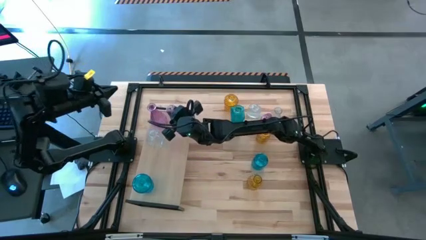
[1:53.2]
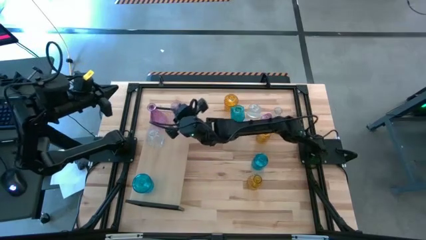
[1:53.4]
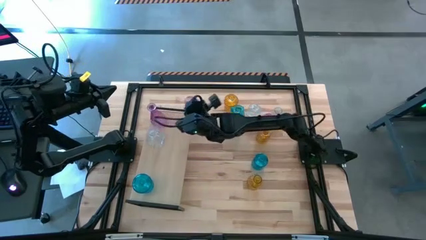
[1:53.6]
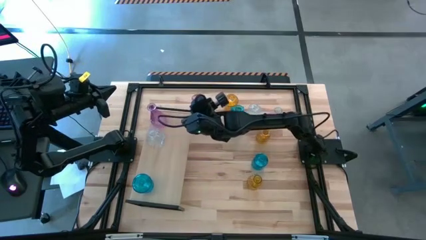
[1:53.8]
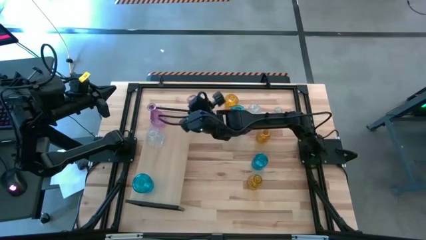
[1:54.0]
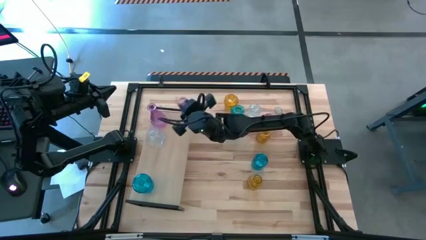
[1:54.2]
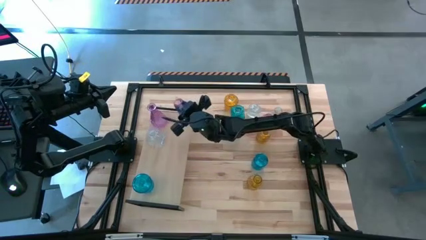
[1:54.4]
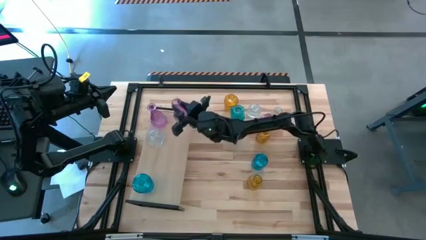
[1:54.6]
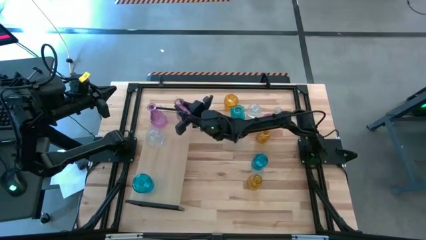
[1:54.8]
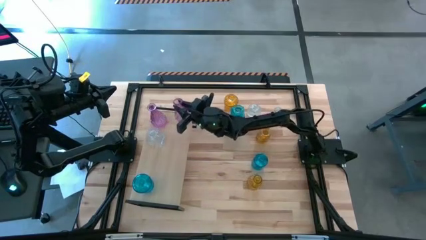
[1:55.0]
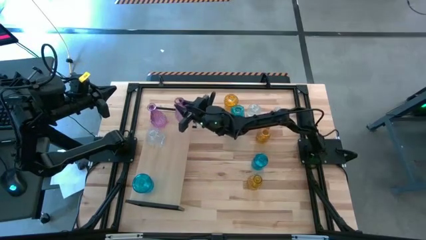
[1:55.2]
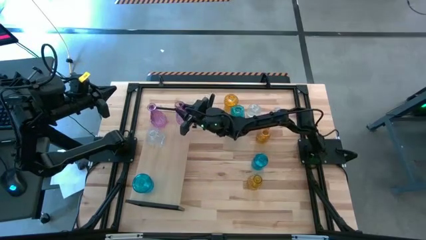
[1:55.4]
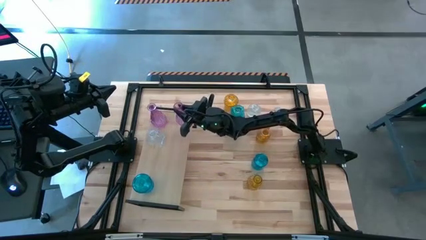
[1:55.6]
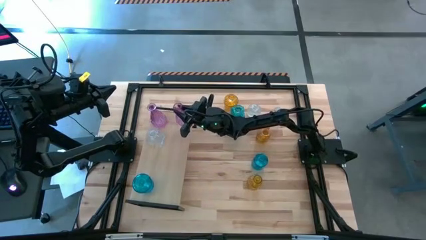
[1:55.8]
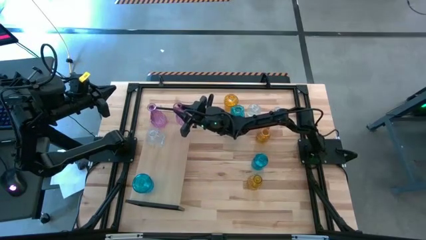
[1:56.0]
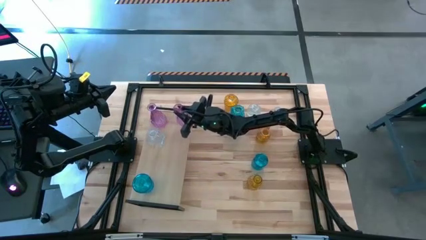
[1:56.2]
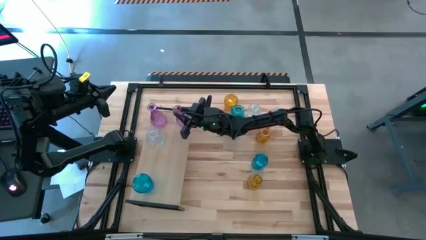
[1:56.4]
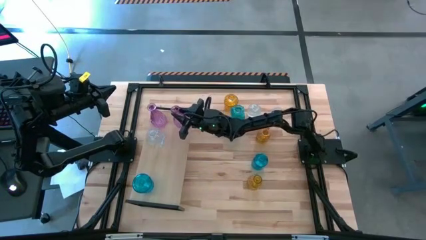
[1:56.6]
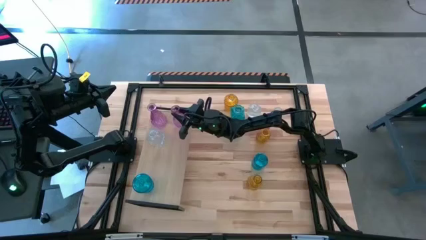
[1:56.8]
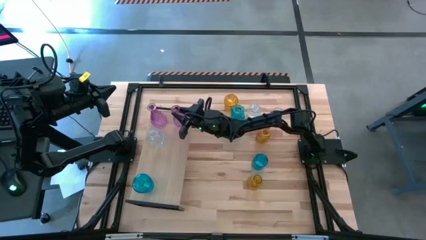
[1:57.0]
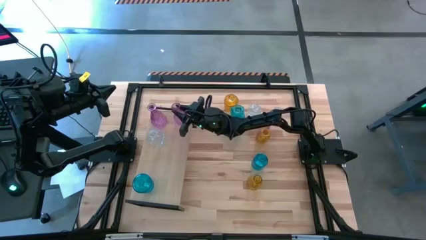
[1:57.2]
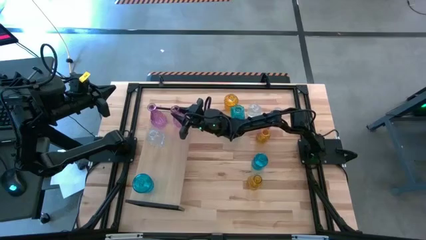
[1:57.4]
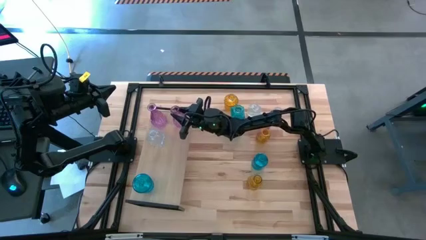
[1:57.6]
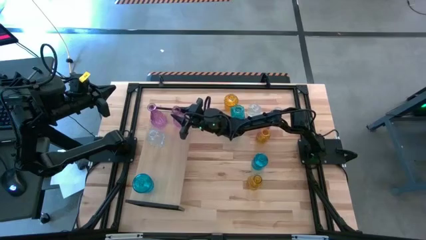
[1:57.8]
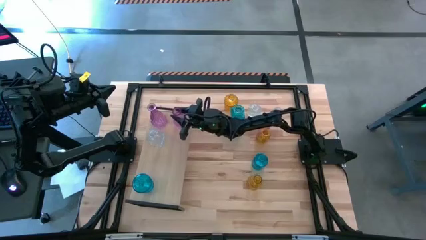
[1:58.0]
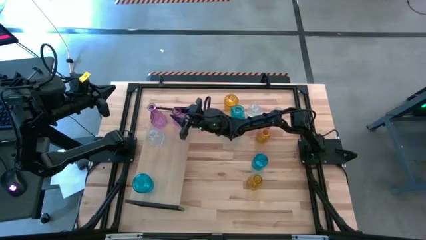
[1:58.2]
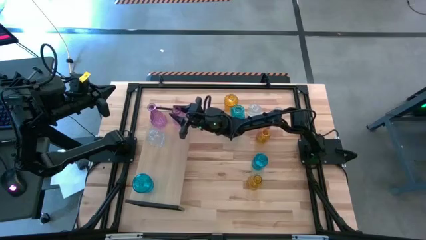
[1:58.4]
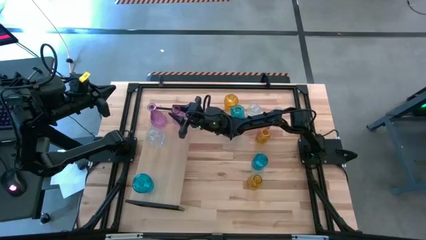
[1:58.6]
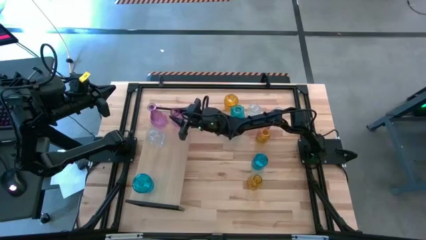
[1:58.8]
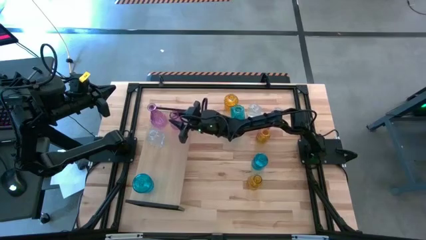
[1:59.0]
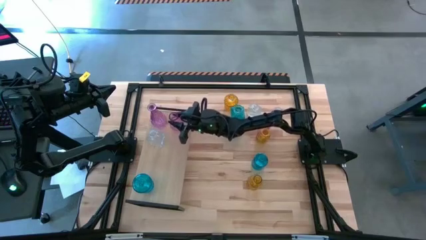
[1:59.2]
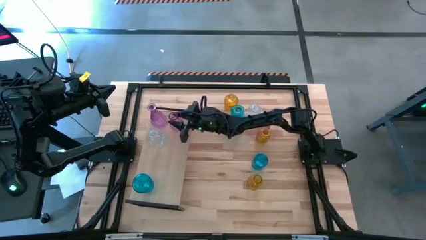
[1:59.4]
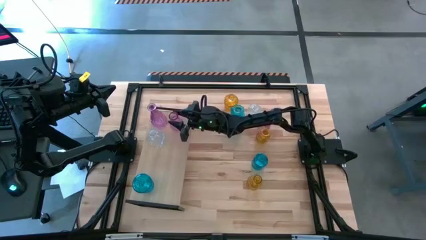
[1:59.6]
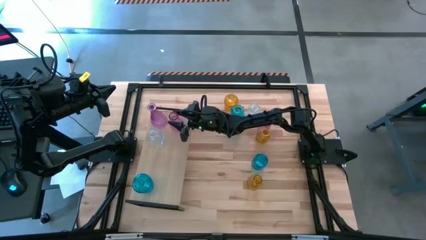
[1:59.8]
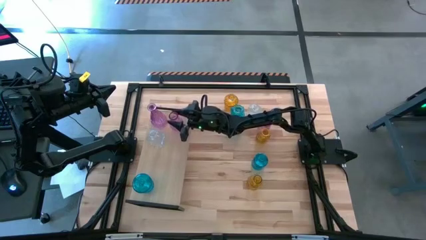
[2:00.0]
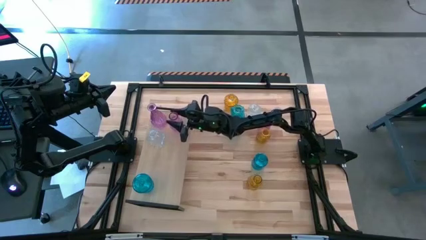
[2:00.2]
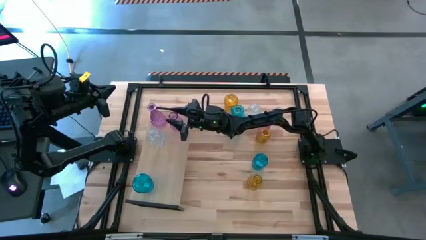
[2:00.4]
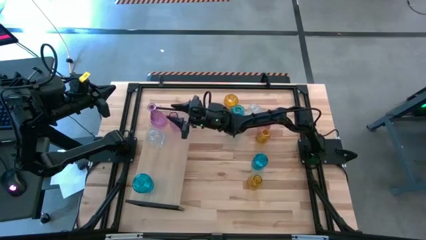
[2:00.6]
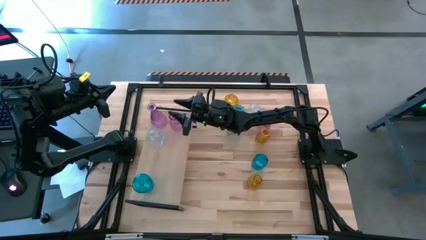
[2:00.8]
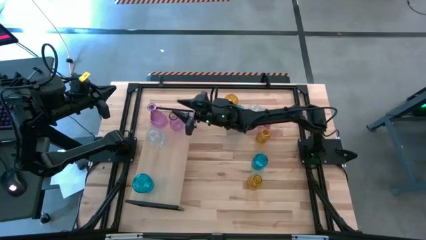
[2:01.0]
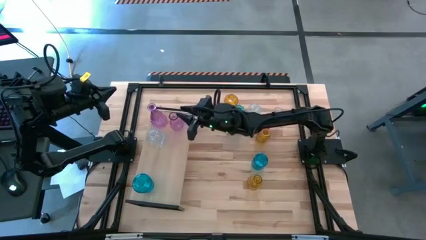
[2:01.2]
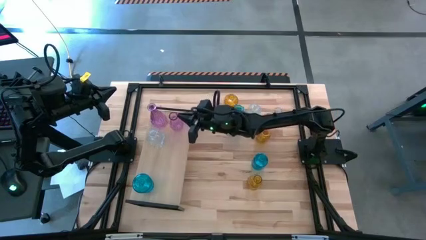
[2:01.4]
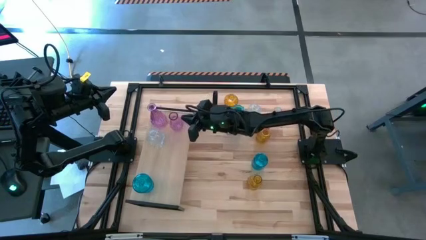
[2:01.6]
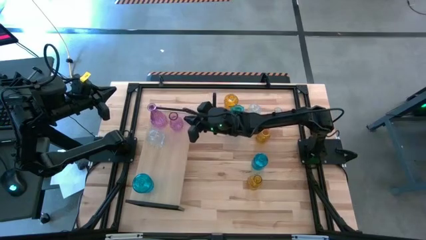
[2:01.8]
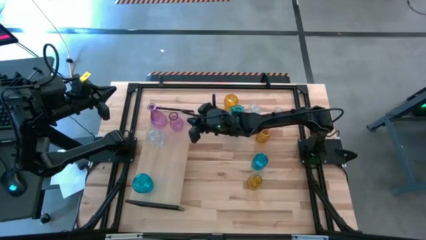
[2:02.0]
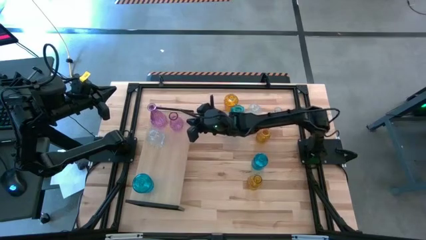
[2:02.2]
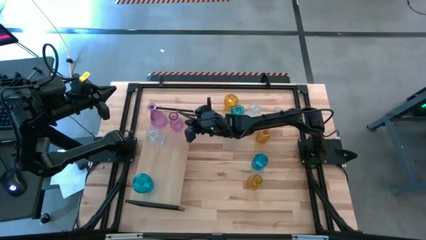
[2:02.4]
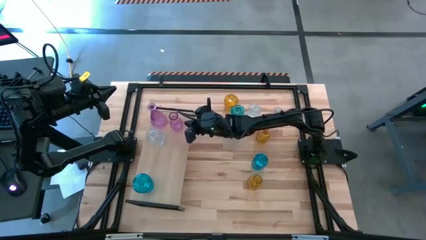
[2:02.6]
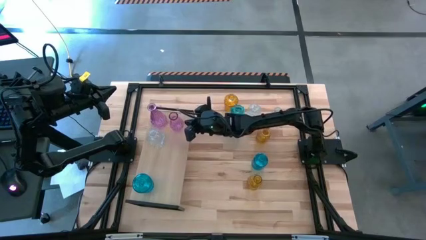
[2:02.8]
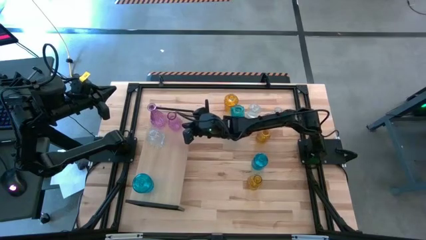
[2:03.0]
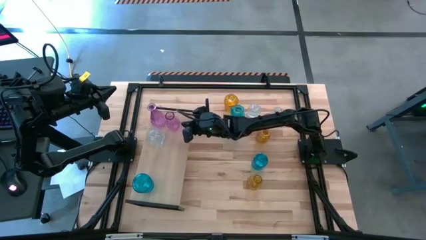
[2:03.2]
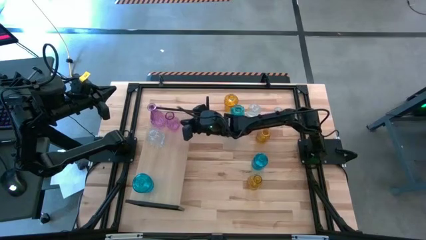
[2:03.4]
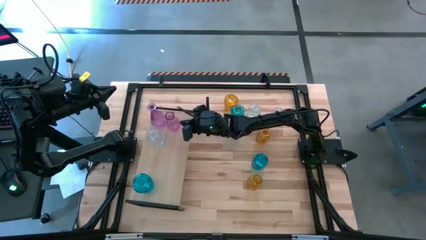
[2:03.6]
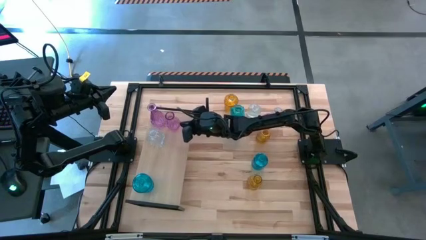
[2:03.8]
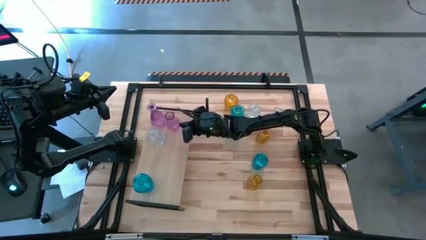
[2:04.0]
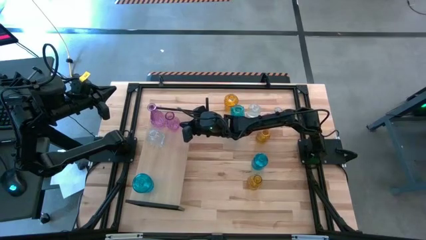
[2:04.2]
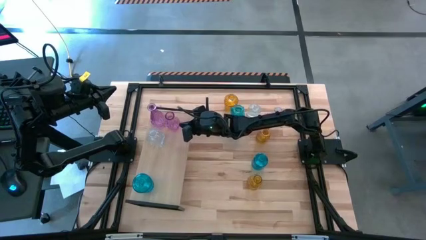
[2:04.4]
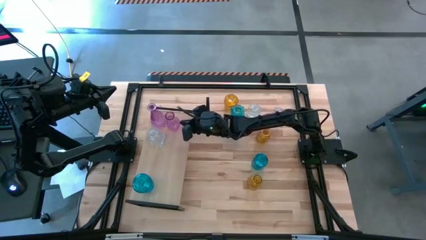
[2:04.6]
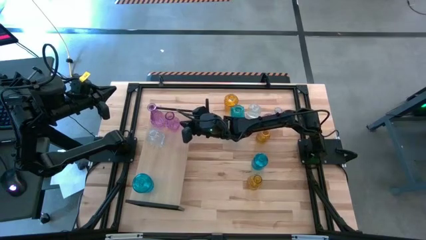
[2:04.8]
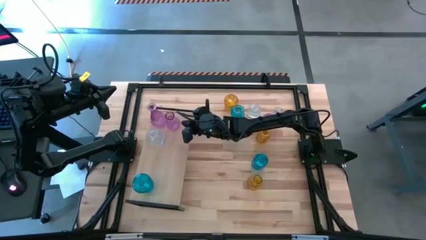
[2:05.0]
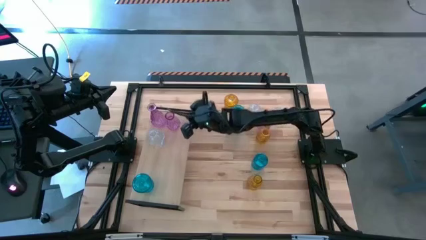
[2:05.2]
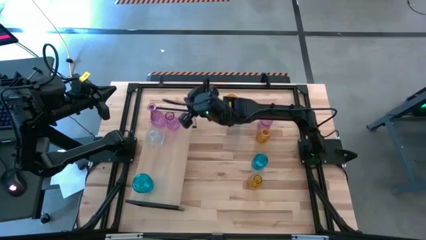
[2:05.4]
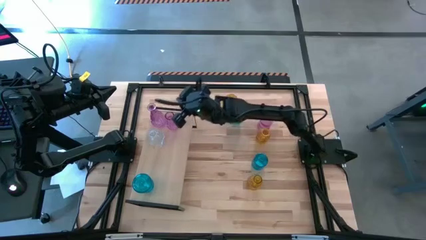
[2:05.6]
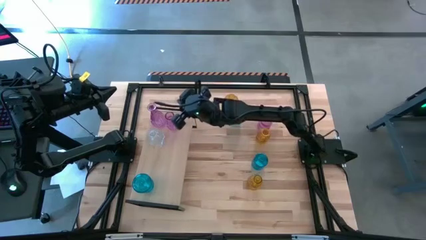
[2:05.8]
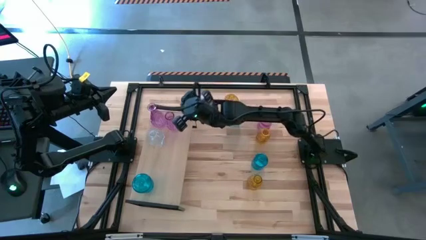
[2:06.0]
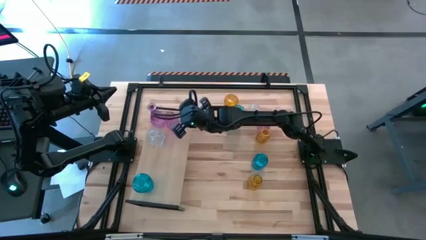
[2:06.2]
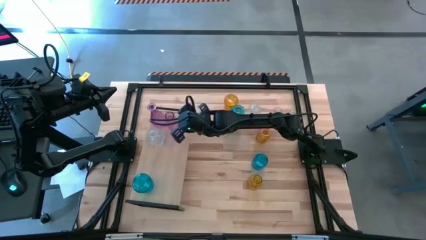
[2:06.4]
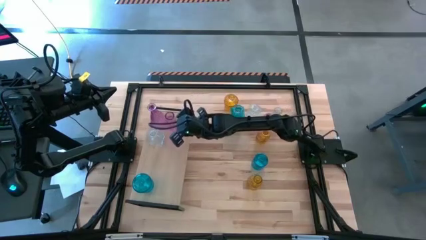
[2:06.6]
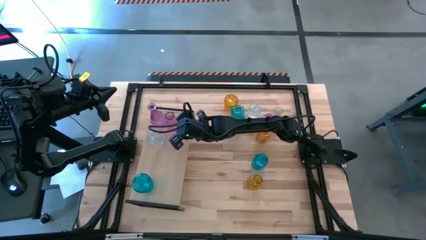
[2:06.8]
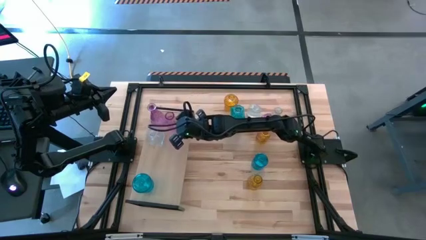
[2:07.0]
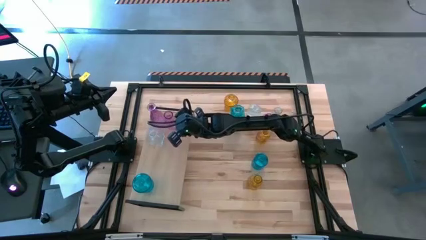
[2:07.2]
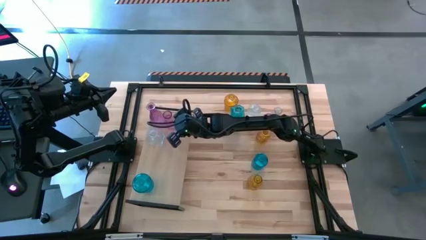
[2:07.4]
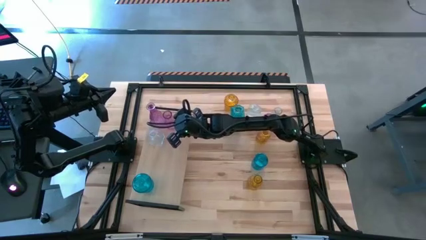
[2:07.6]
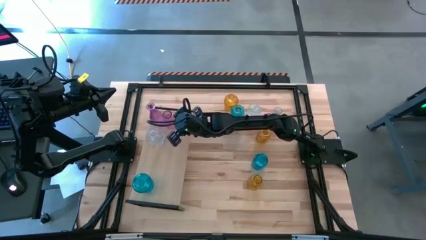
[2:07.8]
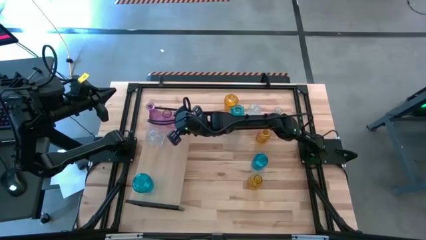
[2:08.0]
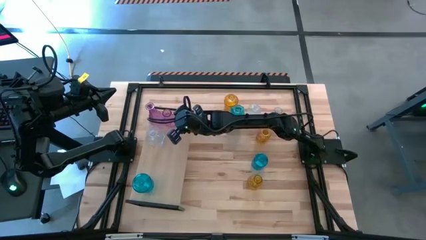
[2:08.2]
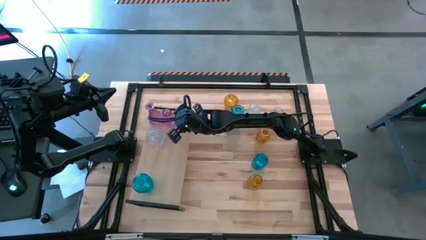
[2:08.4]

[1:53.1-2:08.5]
Task: sort vases onto shelf
Put the left violet flower vase on the shelf
